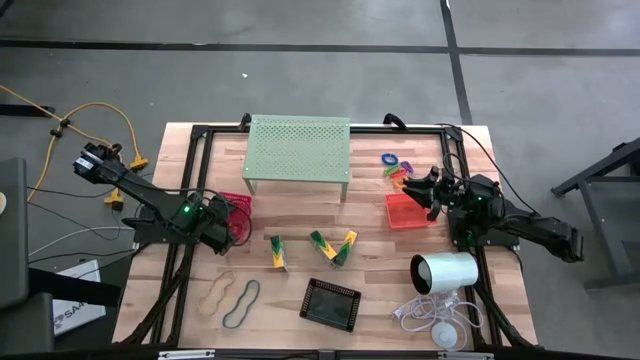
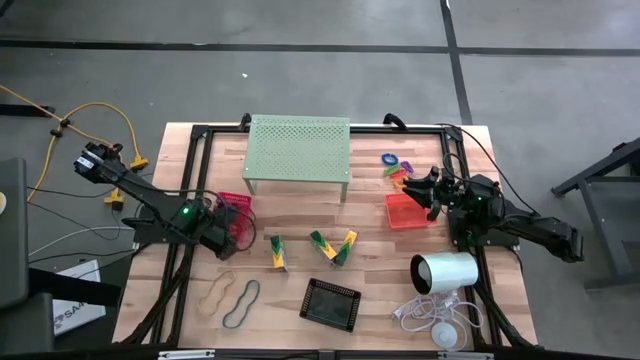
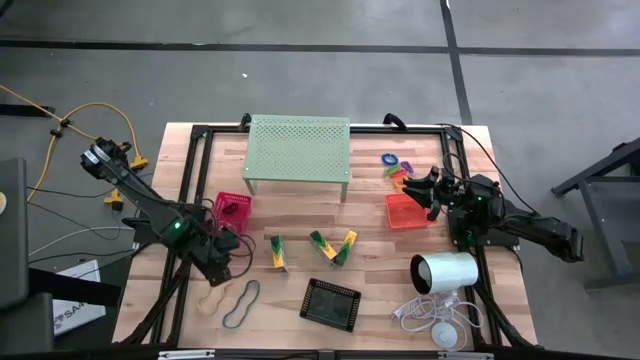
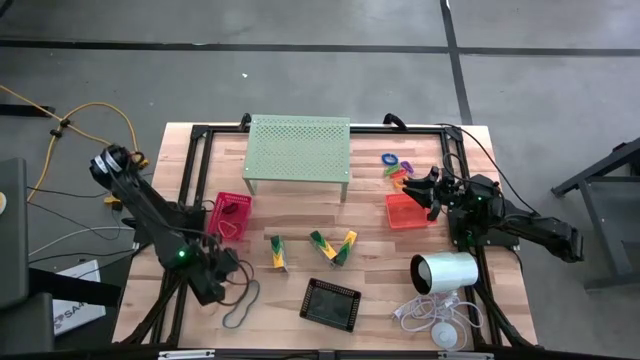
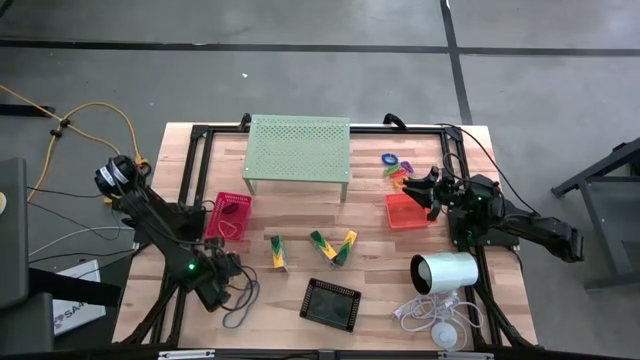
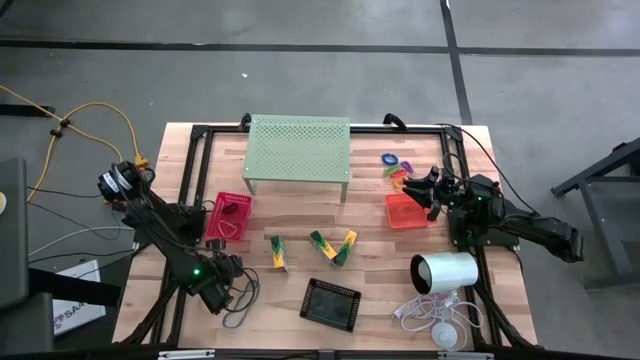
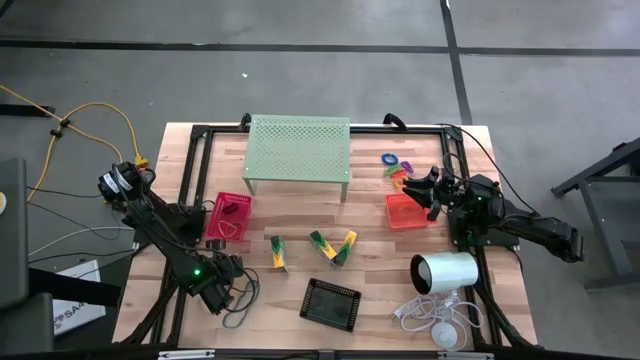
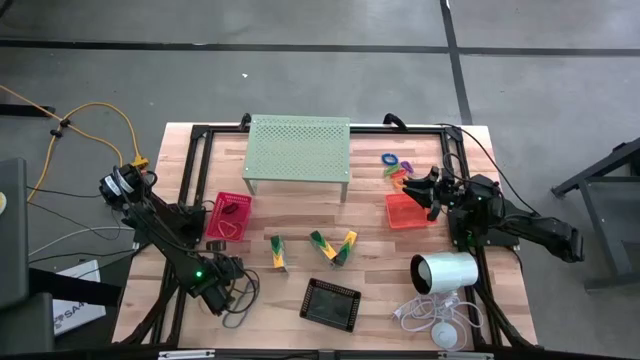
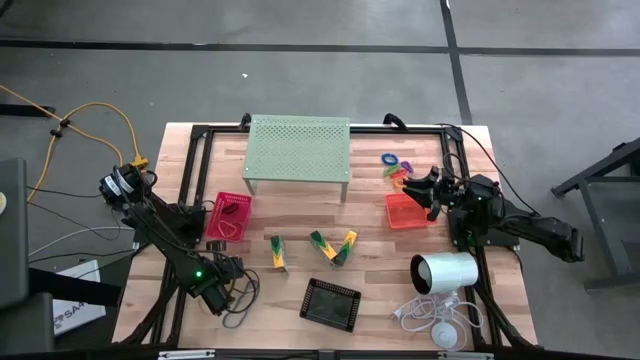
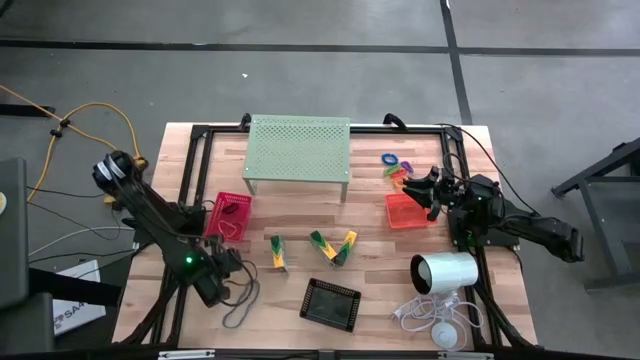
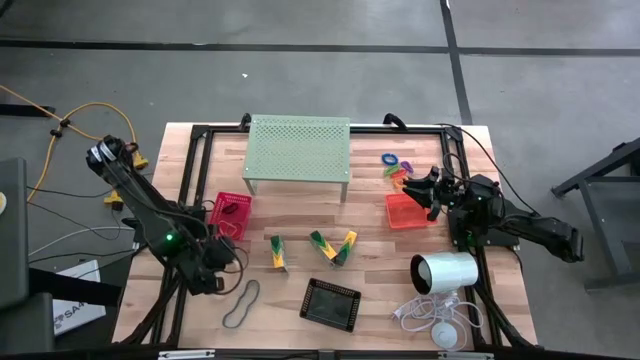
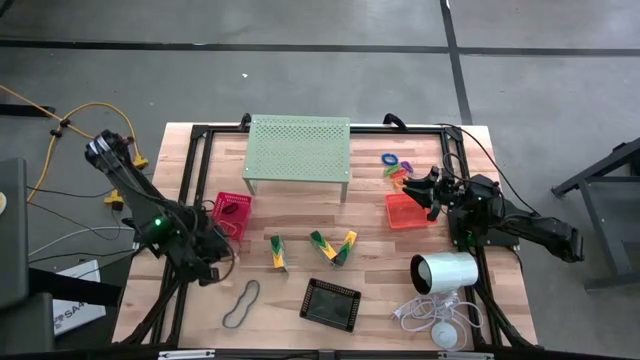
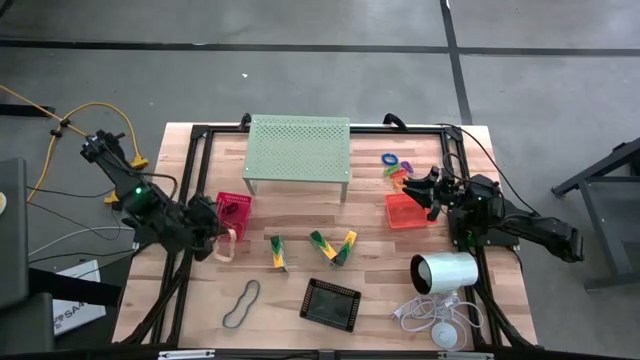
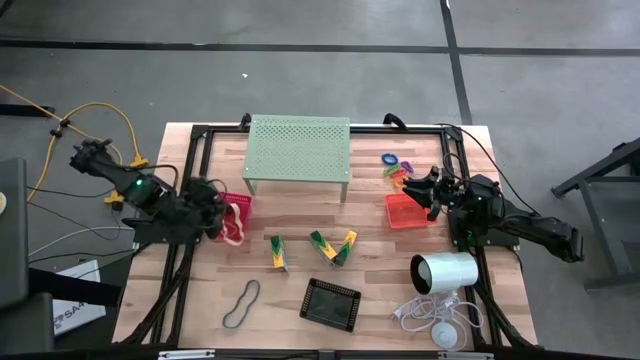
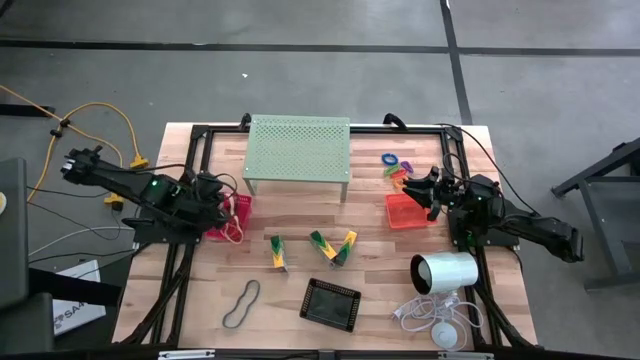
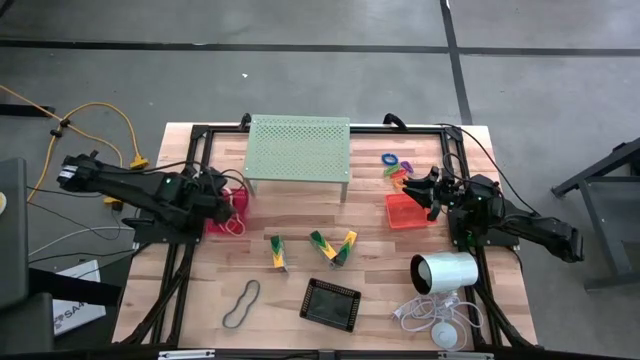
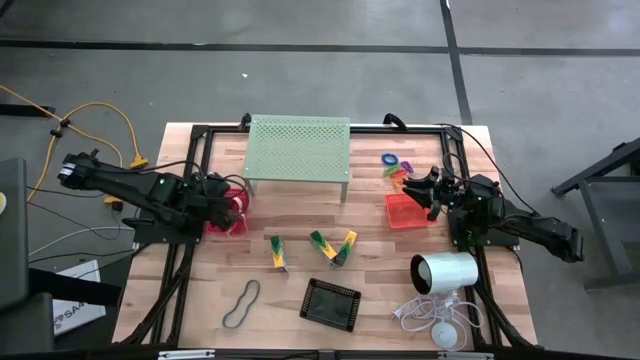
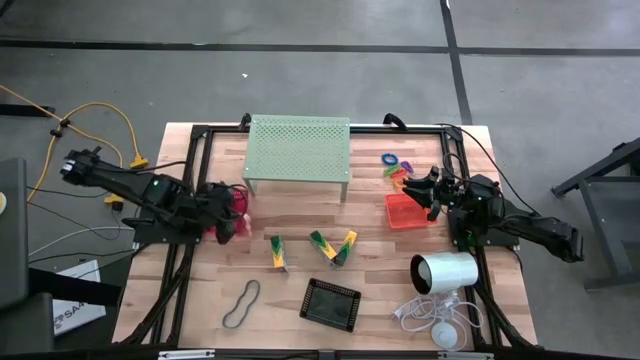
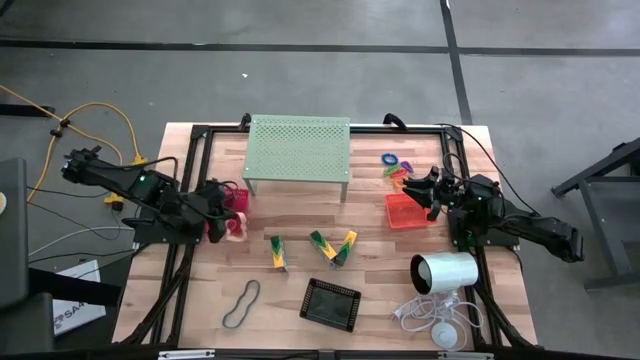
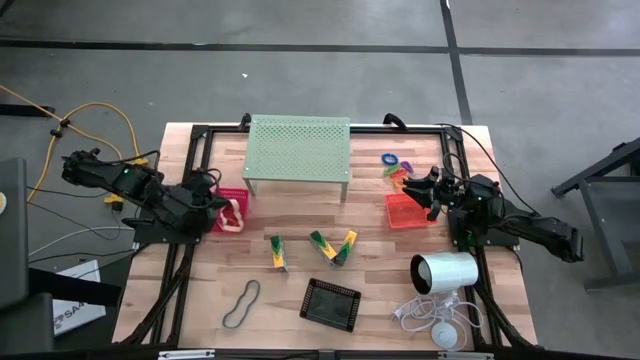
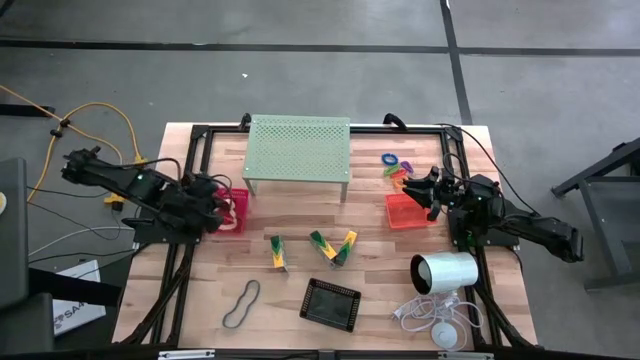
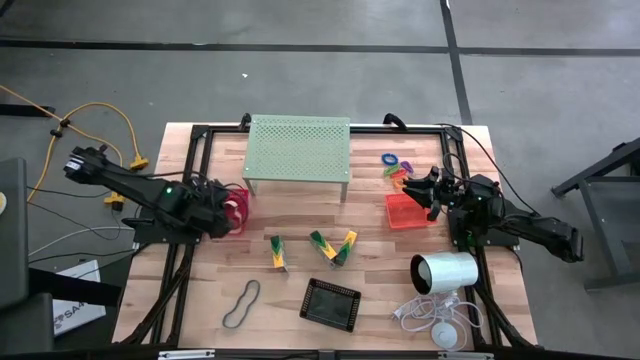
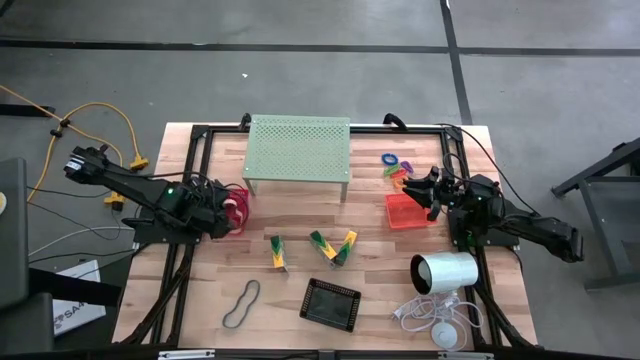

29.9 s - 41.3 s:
Task: Pick & Place Office Desk Supplies
Put the brown rubber band into the red bin

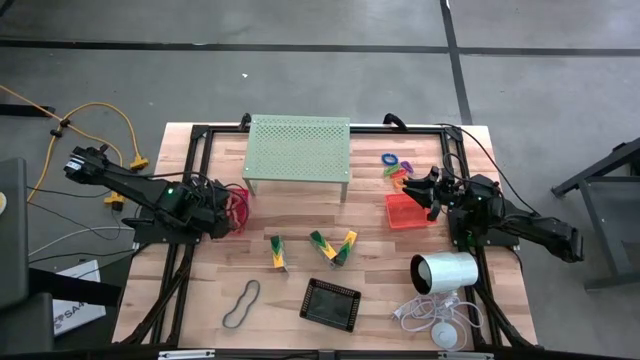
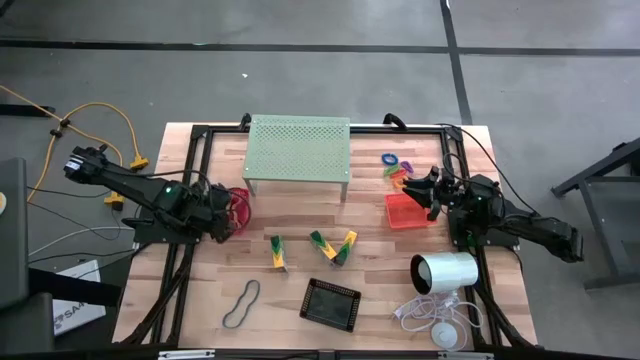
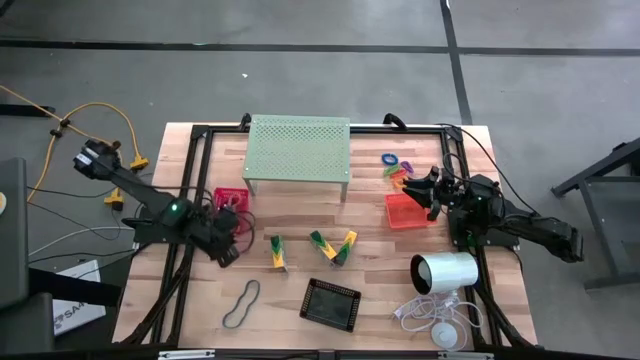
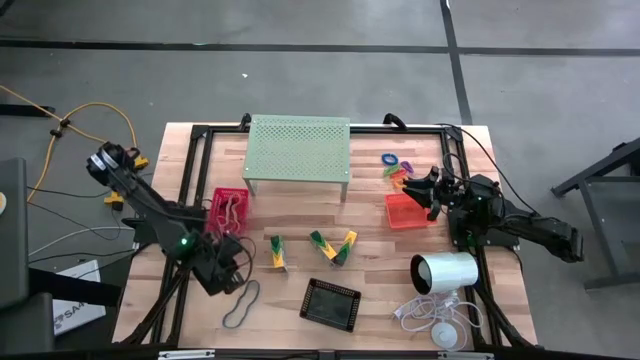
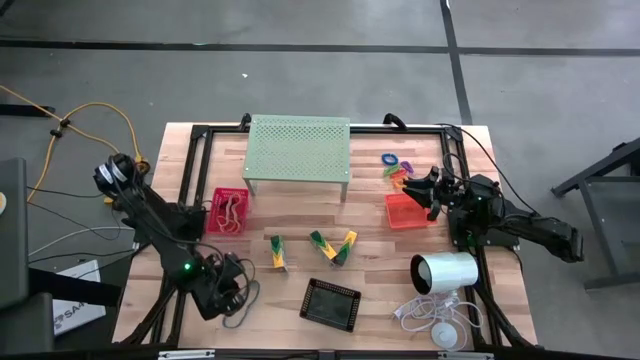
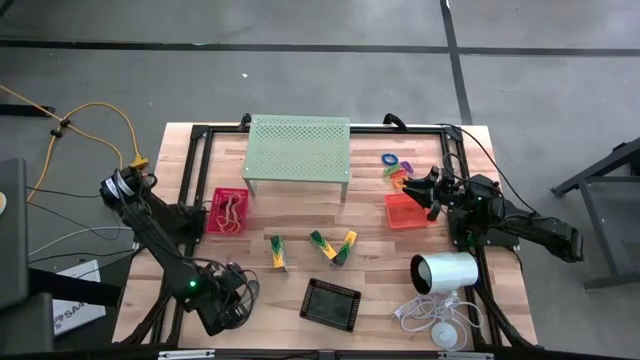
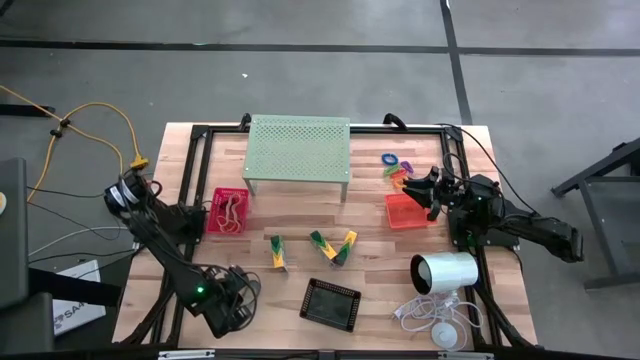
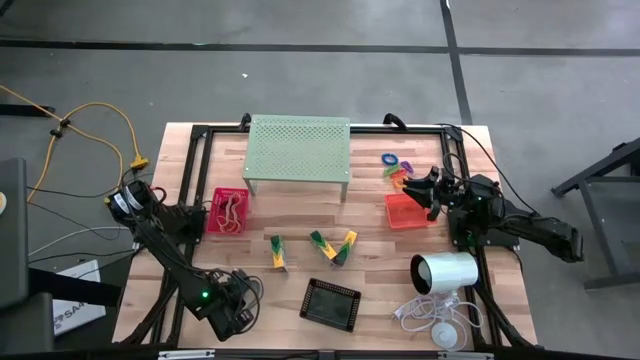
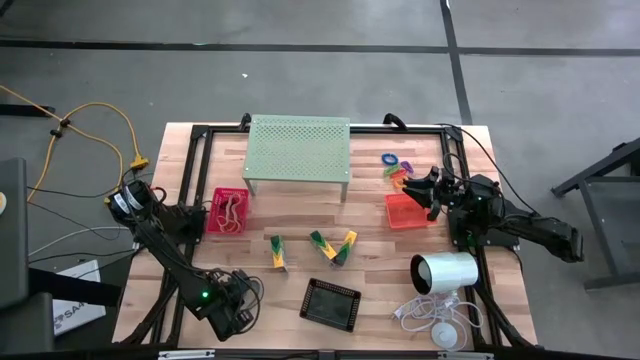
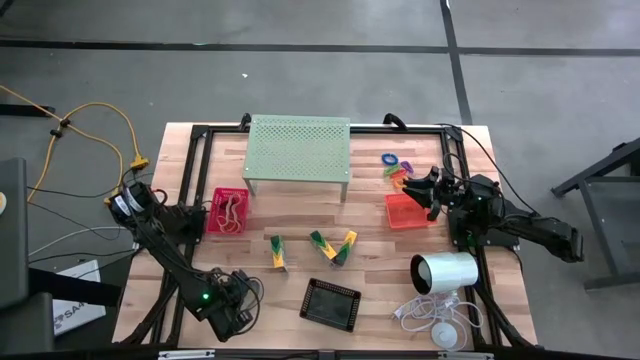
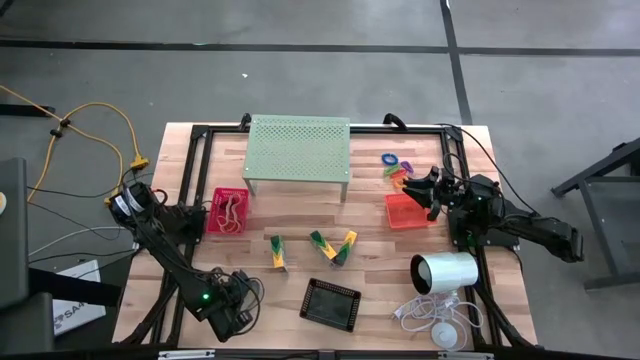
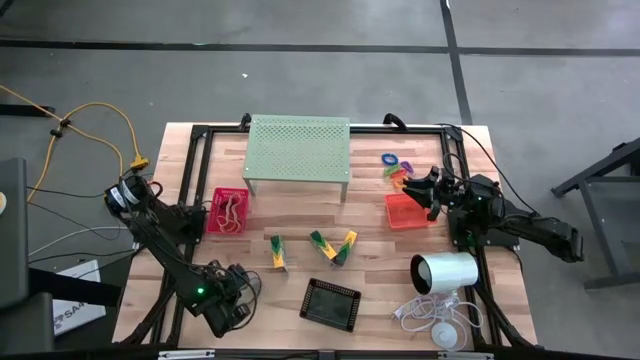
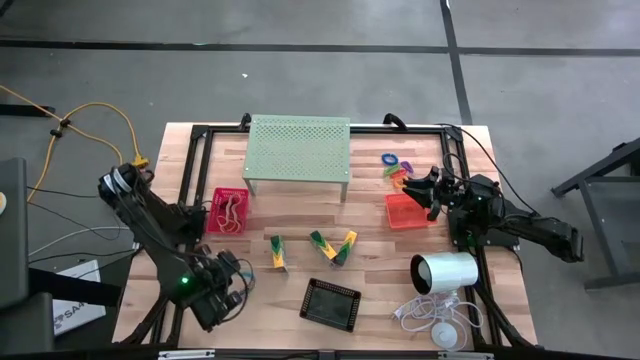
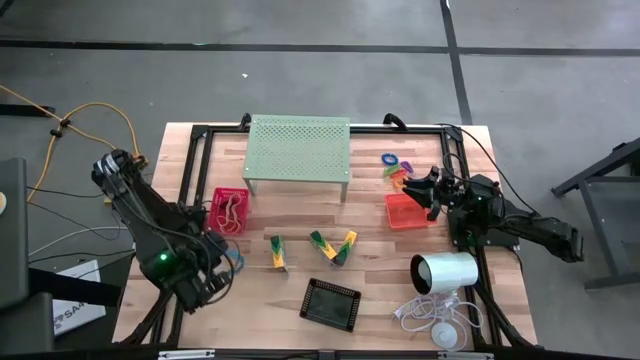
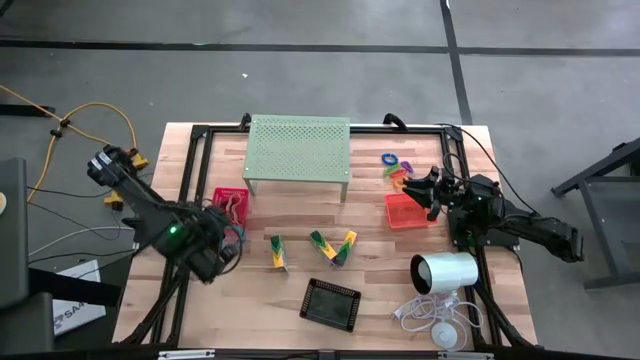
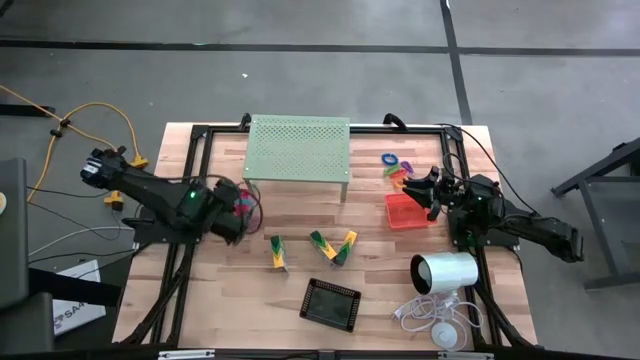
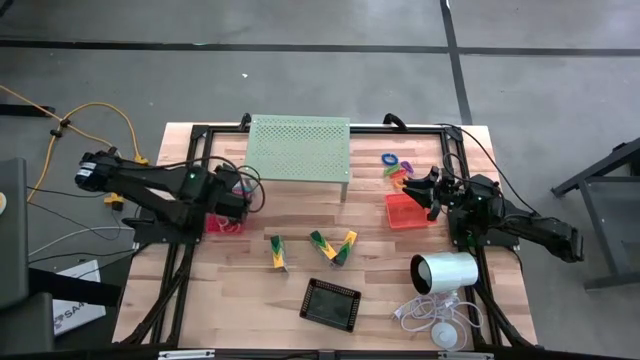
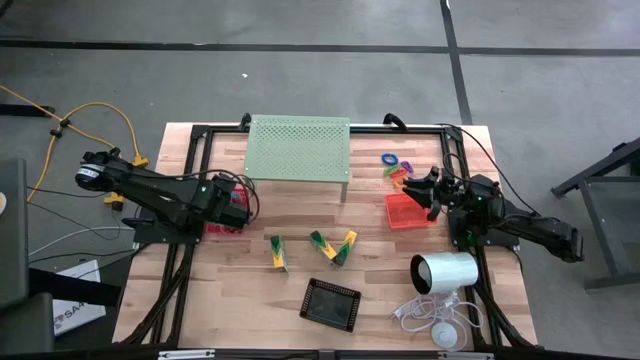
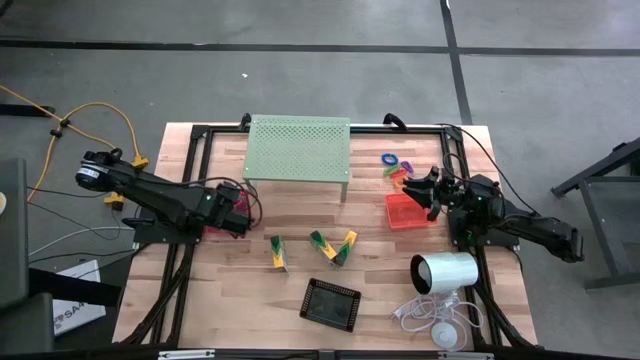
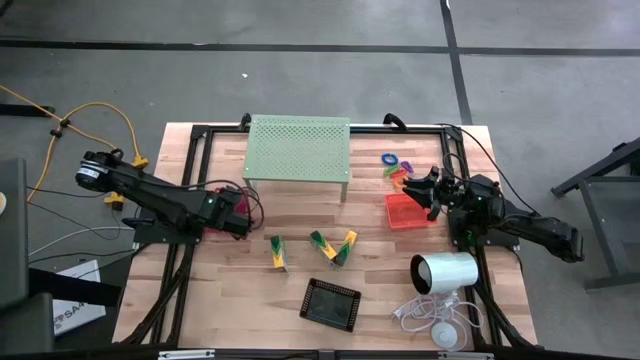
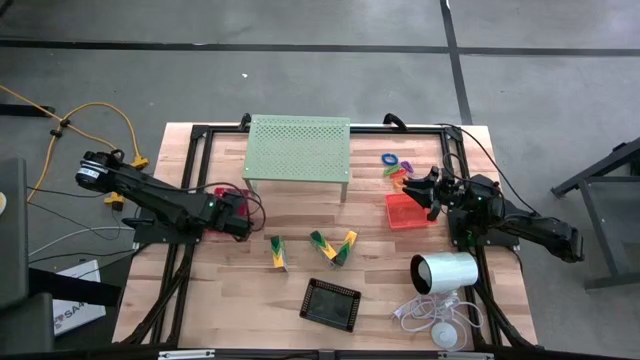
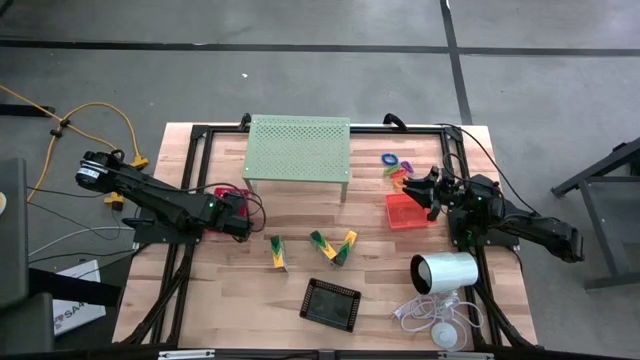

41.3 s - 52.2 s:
Put the blue rubber band into the red bin
